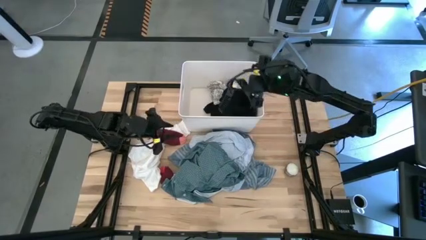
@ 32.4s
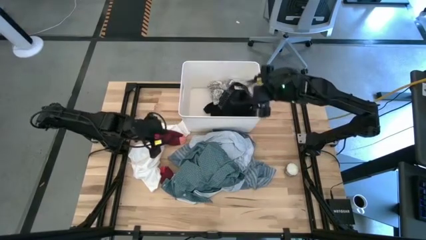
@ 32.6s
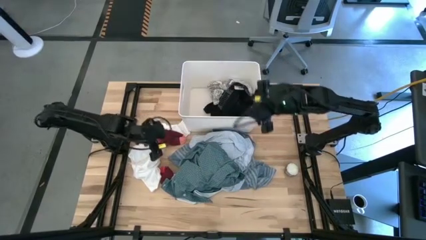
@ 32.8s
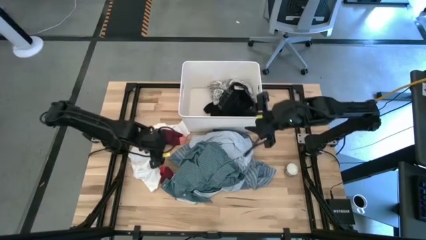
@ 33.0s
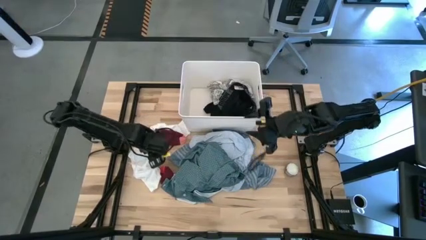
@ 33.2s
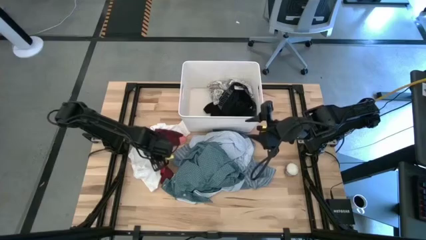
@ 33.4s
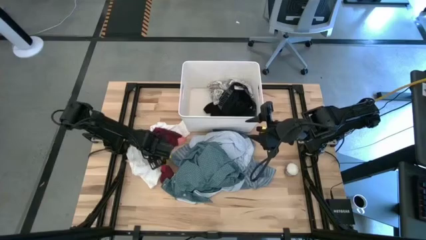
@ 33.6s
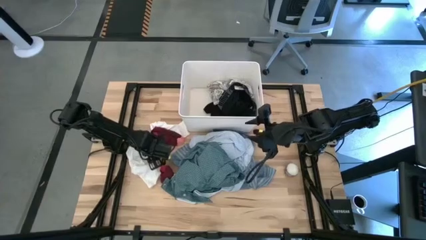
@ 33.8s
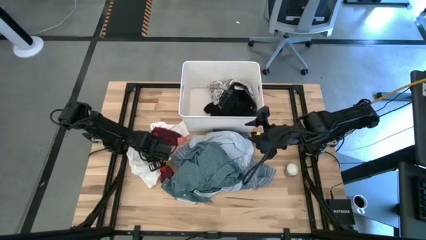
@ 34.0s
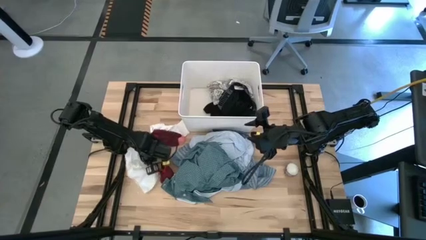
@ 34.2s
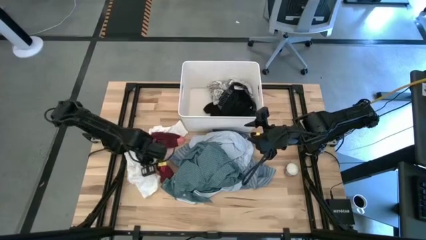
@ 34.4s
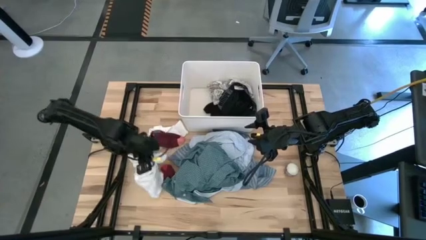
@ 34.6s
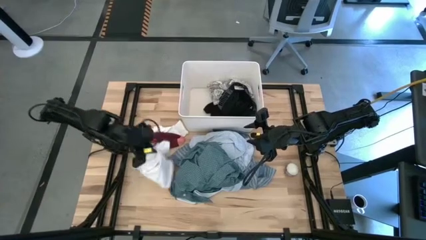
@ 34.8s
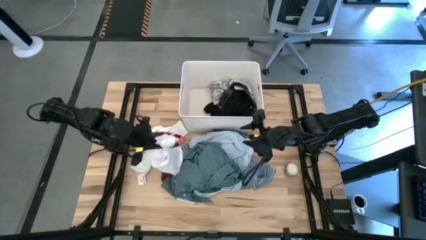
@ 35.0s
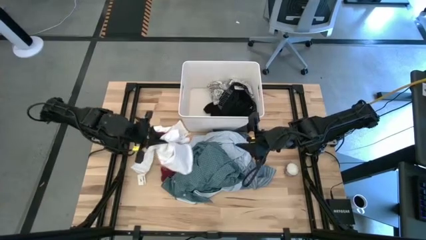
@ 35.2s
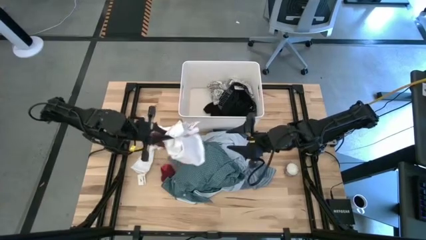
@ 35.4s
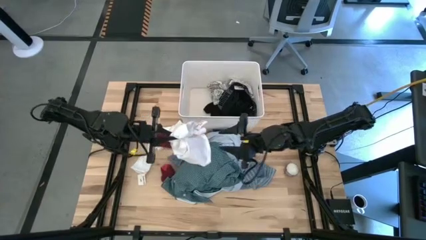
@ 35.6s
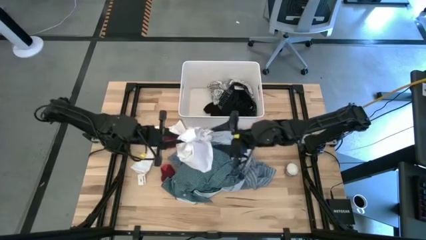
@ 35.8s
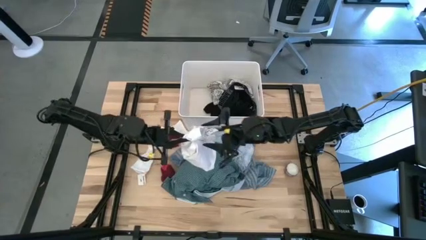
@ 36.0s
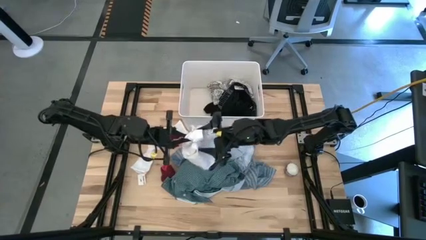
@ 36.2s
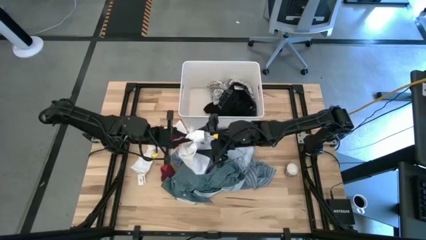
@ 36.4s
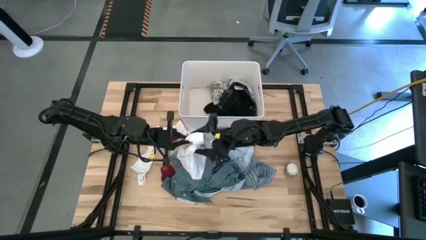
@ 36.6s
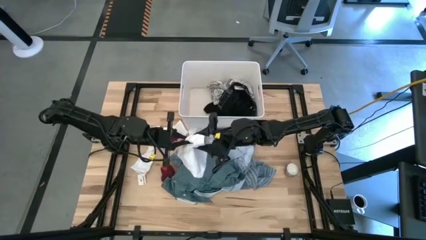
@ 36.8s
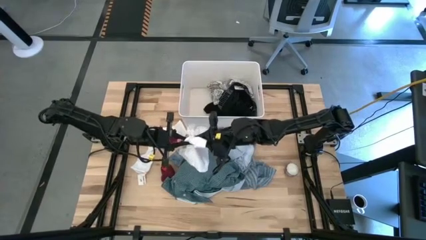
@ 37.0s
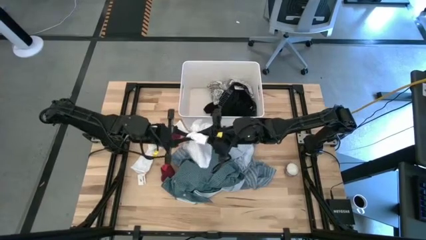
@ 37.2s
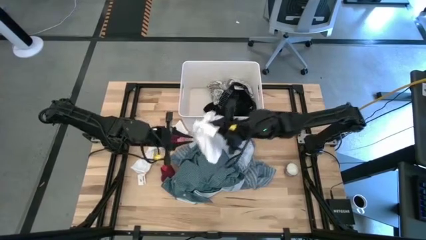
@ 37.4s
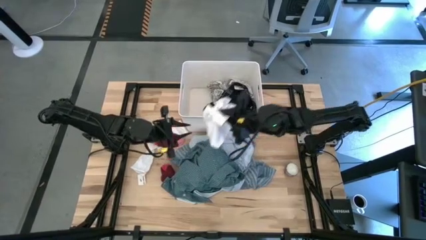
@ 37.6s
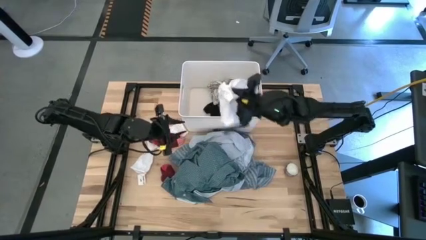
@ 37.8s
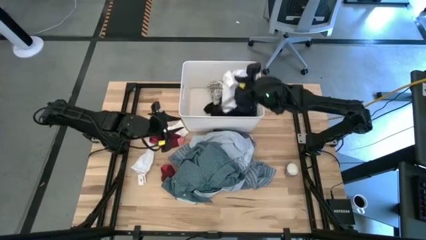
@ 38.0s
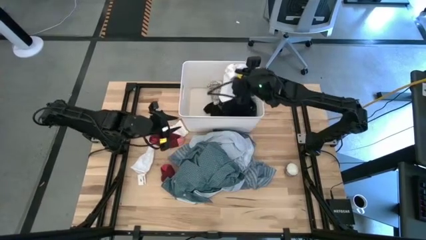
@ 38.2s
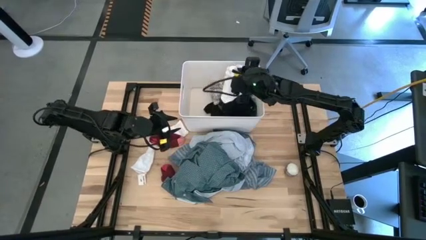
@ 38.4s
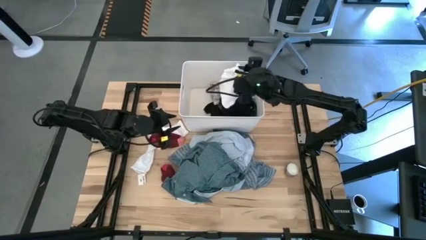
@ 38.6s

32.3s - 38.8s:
Task: Sort clothes
Put the white boxer into the white bin

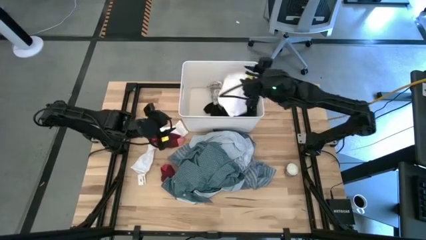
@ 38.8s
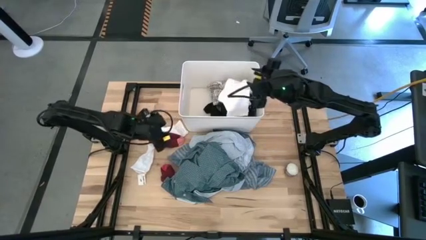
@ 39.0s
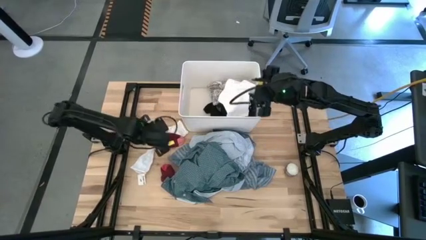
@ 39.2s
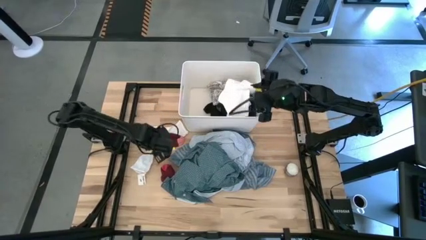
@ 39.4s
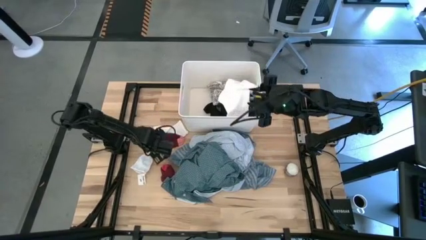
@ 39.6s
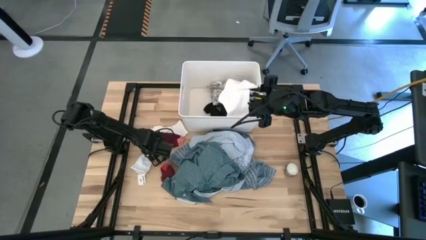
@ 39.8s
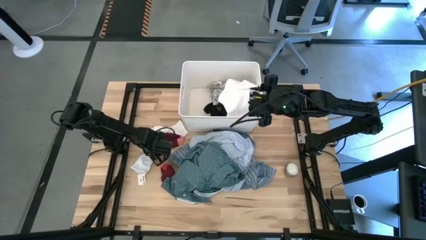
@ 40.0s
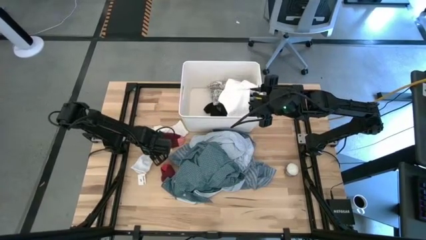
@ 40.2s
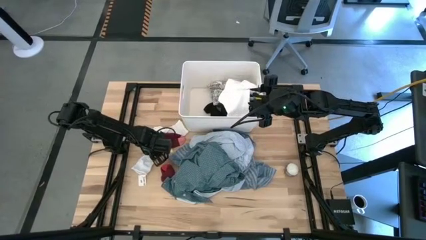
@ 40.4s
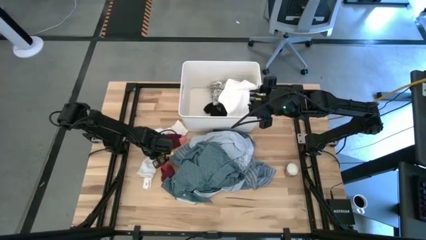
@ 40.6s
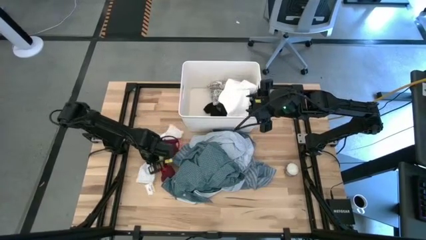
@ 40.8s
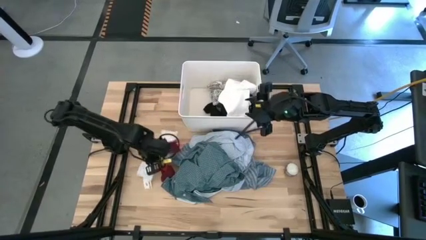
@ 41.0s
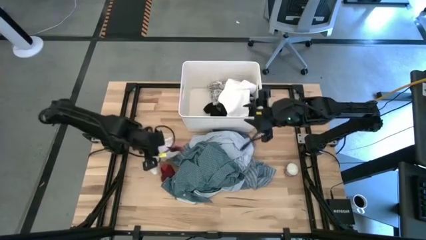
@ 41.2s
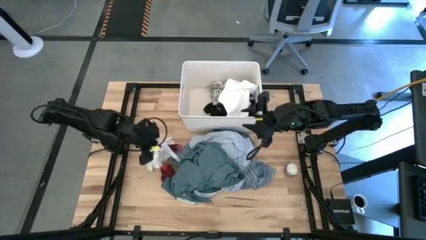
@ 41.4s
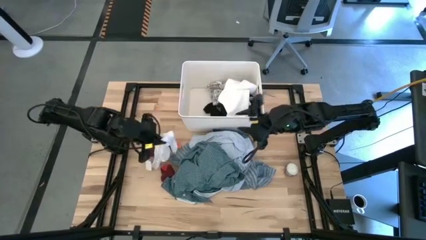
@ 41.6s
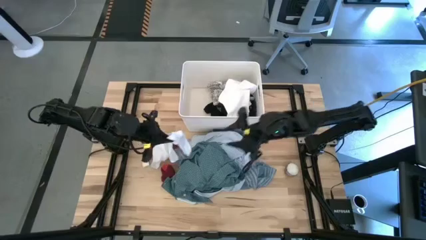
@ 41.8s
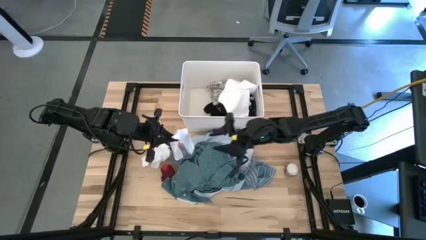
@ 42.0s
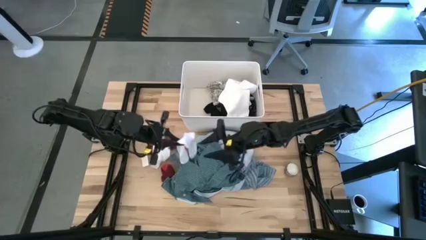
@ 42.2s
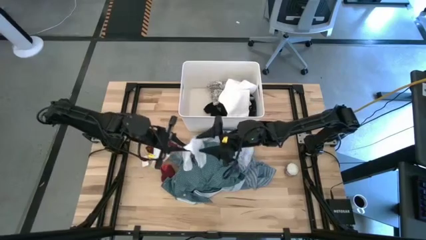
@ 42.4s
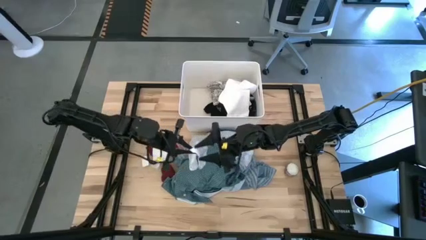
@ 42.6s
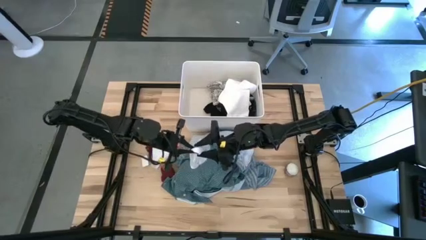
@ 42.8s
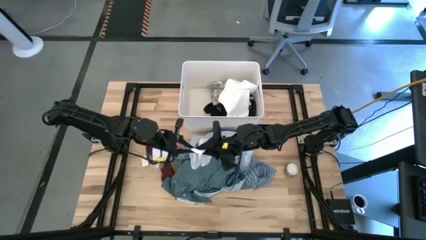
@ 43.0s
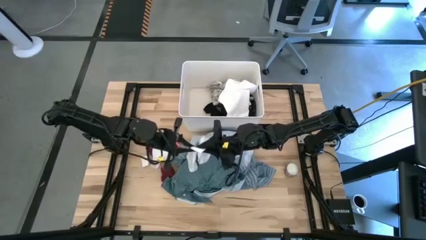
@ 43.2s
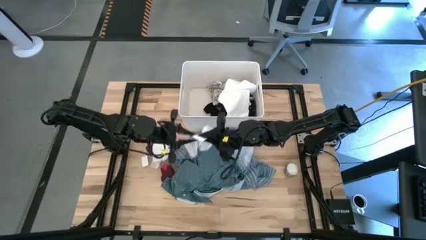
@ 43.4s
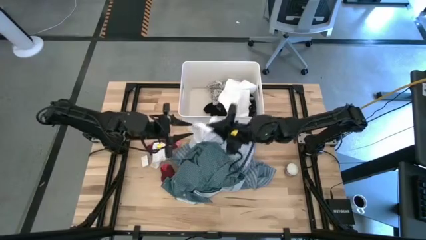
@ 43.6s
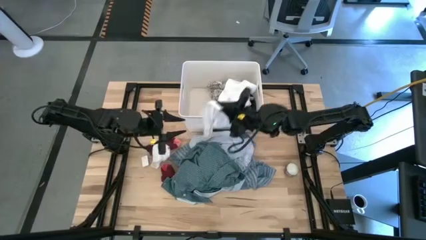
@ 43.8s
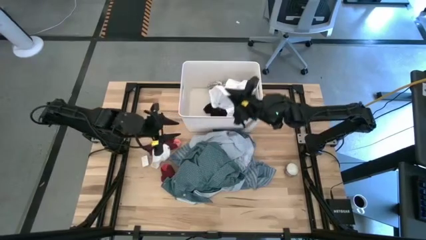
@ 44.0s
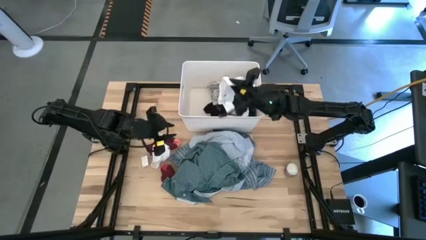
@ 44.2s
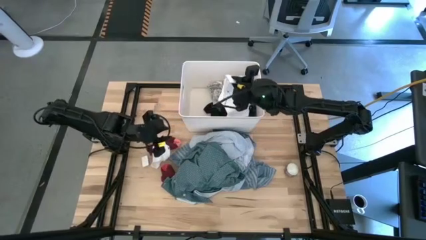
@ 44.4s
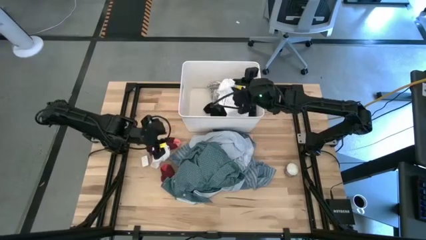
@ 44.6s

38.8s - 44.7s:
Put the bottom white sock into the white bin

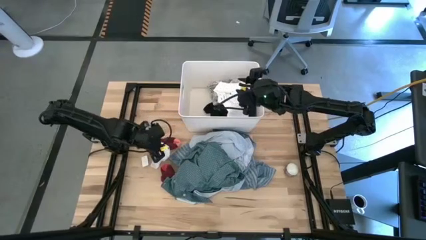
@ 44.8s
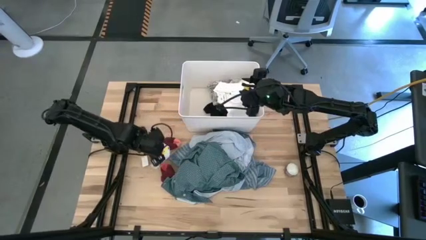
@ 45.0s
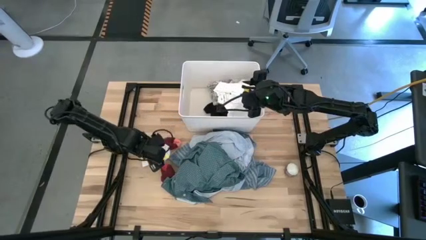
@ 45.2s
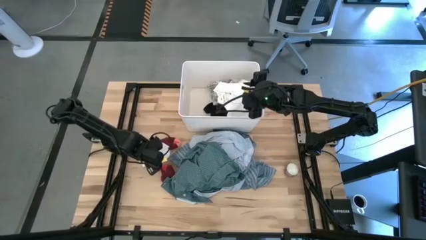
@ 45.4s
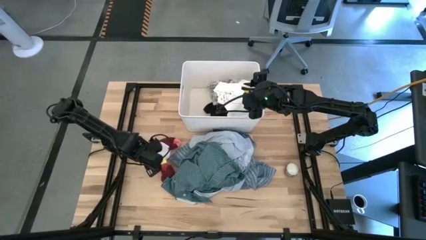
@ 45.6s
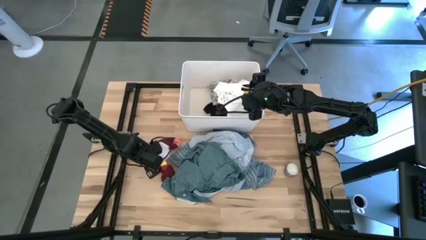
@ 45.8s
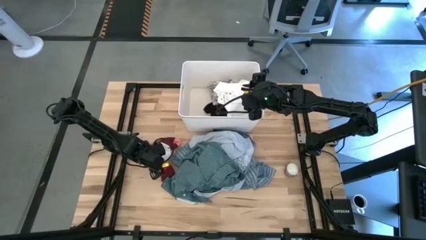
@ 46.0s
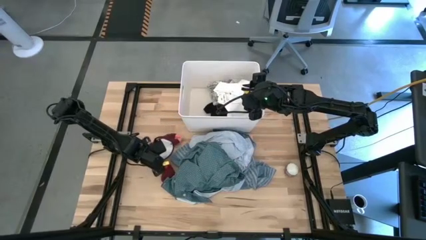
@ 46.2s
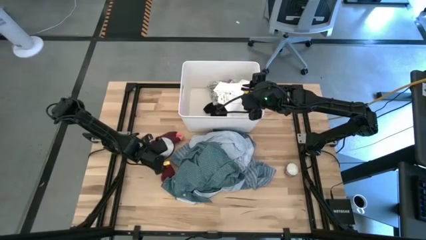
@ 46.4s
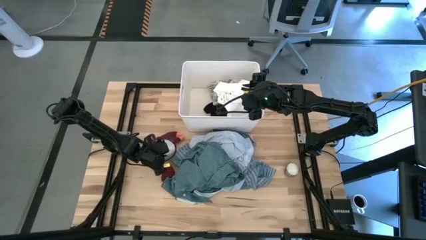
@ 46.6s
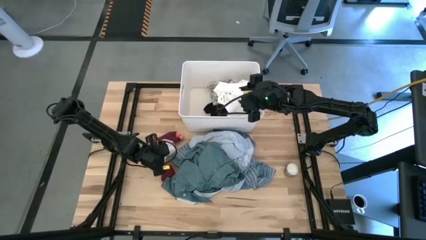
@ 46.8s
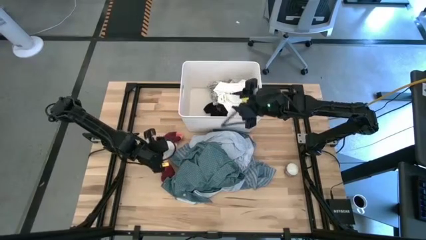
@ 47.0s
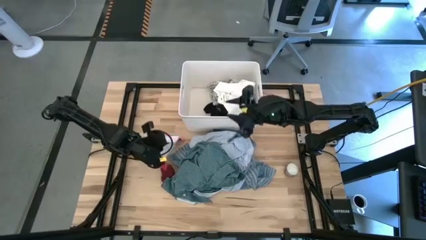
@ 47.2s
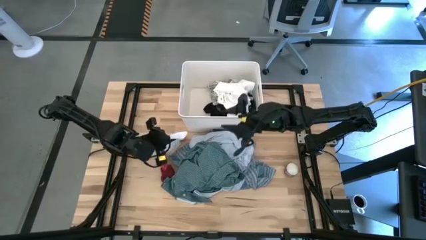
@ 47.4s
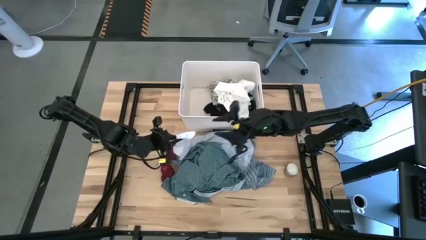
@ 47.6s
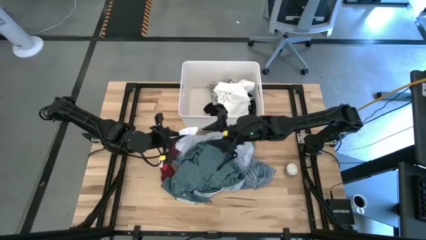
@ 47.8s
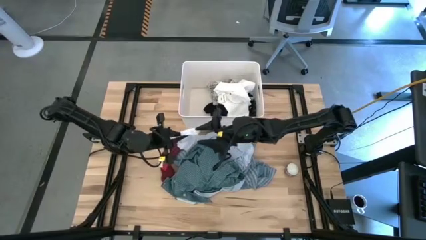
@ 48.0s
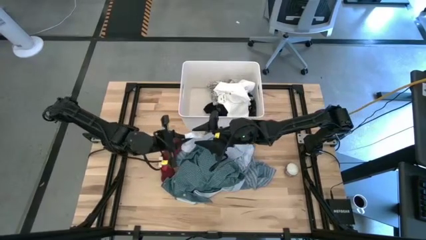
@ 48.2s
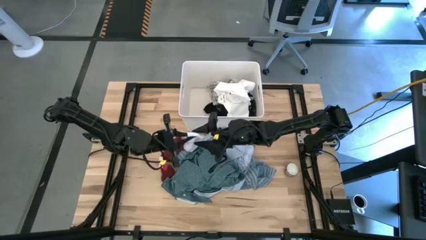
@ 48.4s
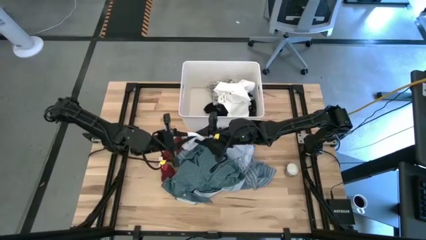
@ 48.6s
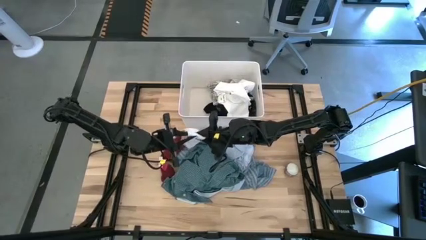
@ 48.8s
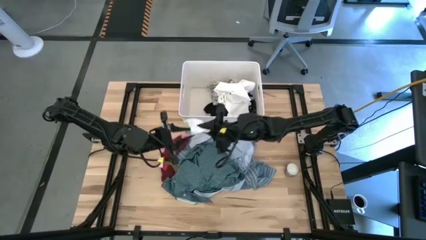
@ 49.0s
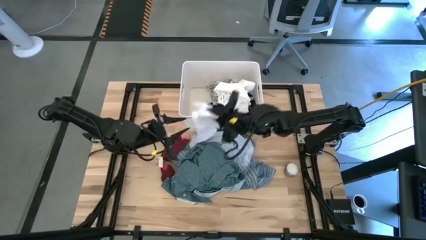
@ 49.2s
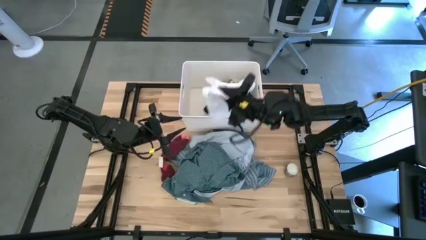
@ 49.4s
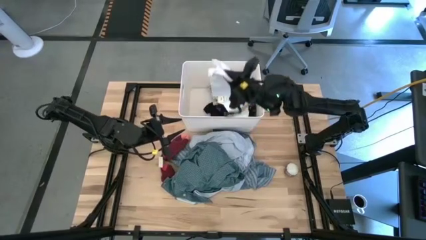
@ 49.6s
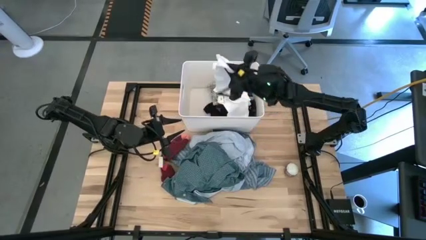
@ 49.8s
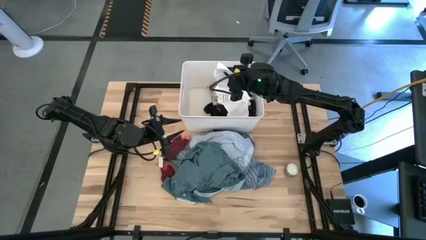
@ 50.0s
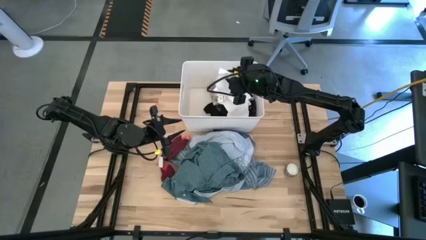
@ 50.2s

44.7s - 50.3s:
Put the white sock into the white bin
